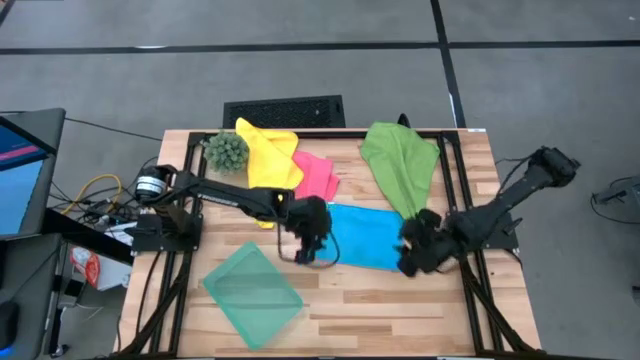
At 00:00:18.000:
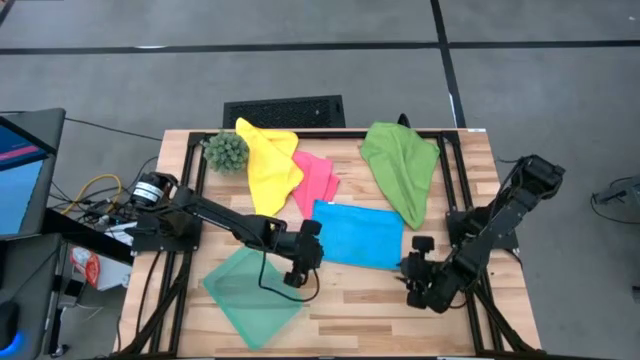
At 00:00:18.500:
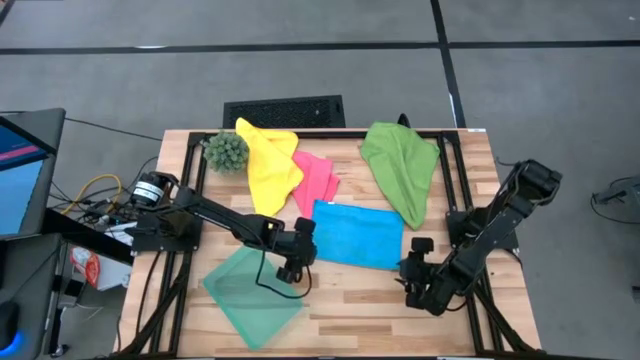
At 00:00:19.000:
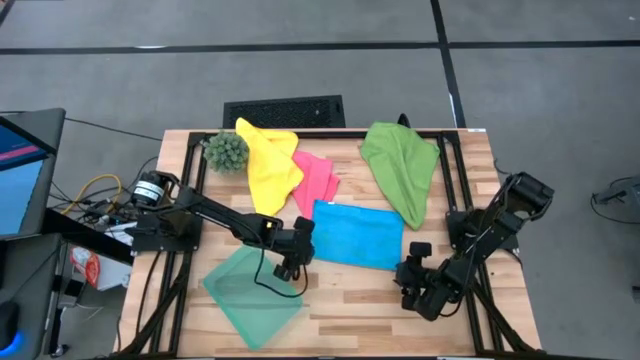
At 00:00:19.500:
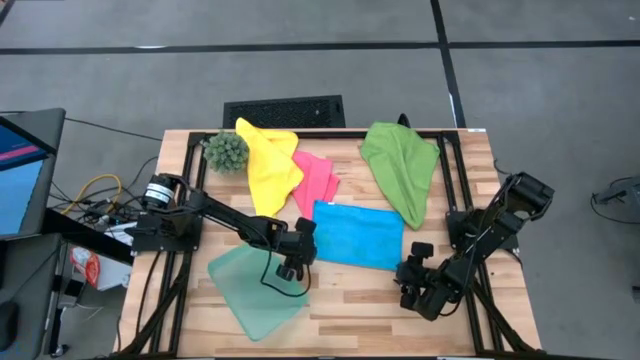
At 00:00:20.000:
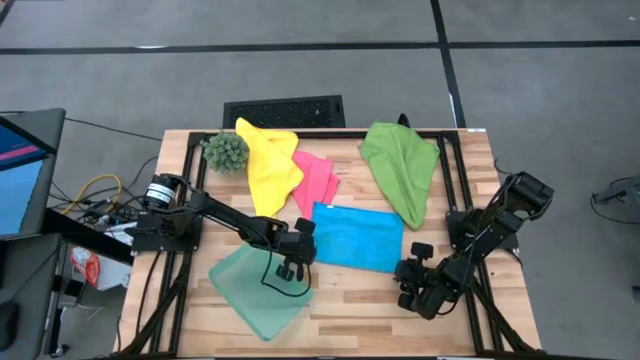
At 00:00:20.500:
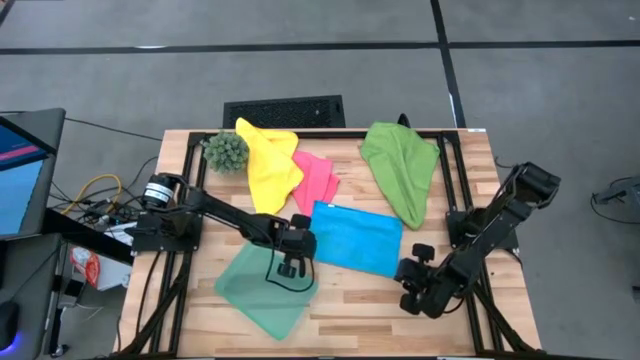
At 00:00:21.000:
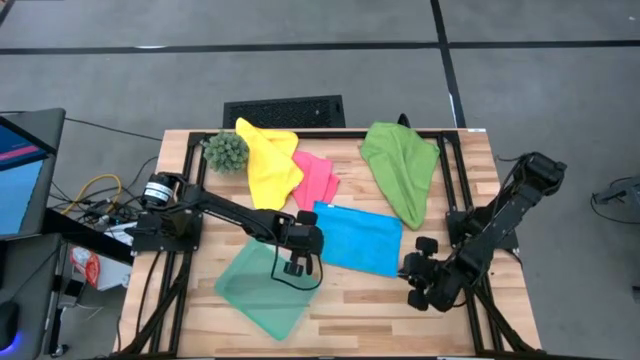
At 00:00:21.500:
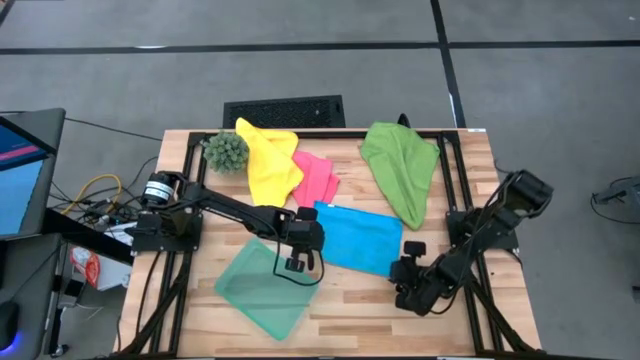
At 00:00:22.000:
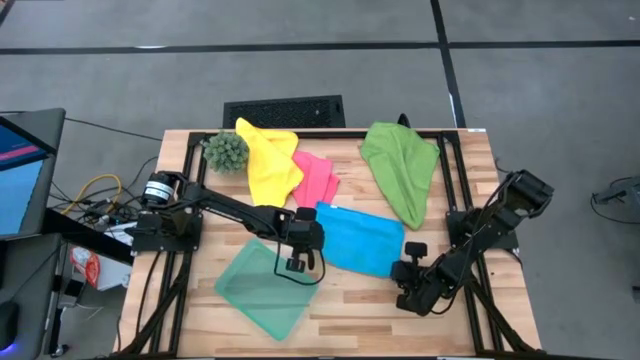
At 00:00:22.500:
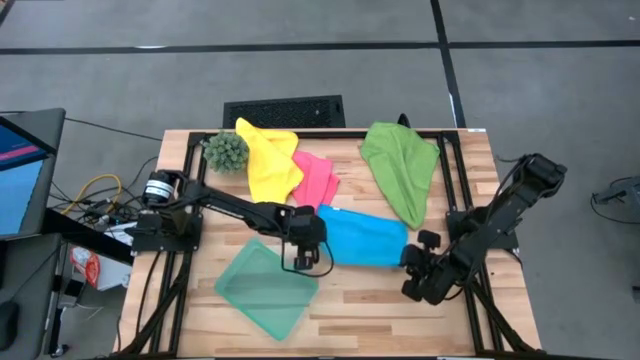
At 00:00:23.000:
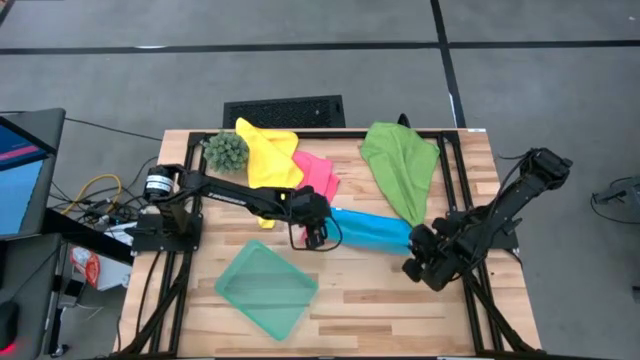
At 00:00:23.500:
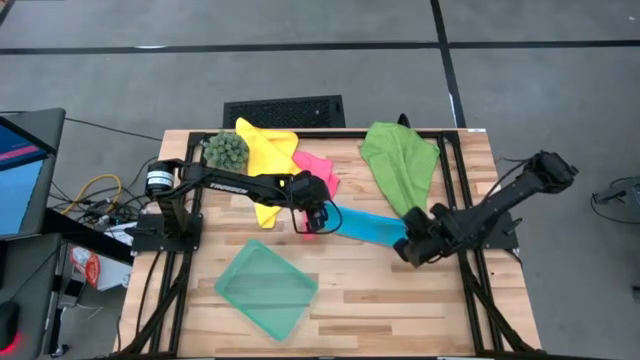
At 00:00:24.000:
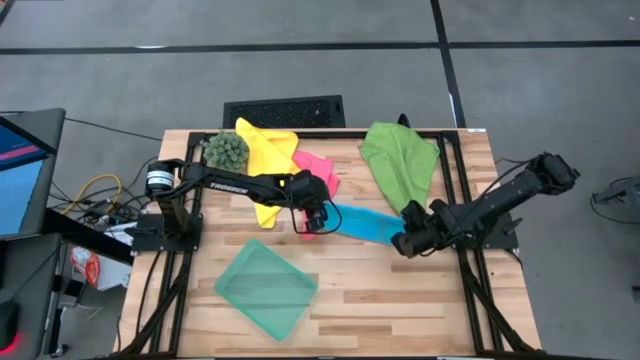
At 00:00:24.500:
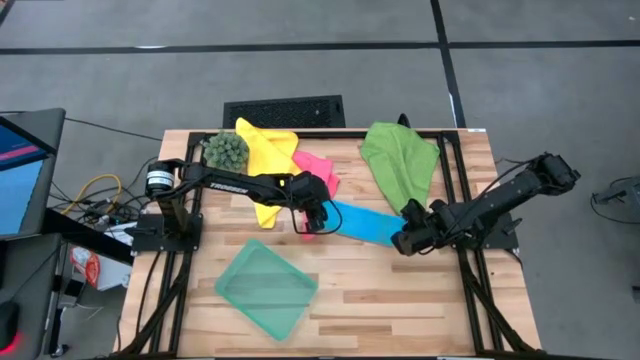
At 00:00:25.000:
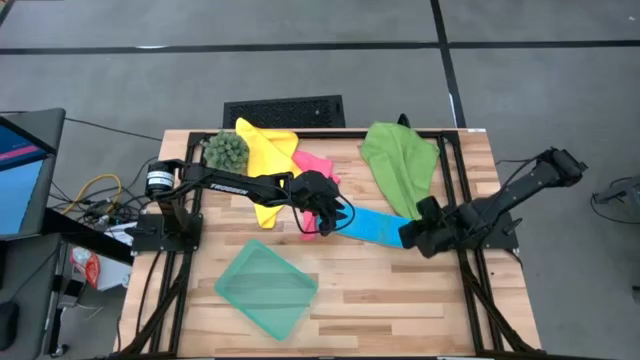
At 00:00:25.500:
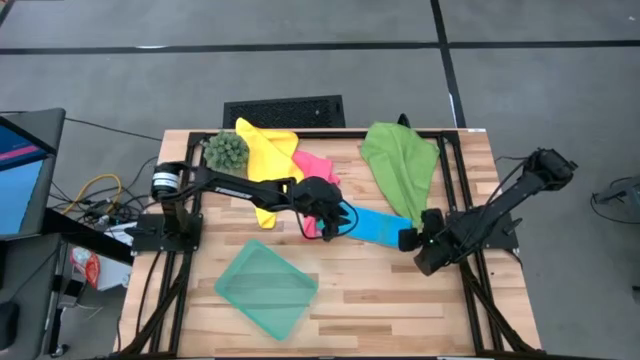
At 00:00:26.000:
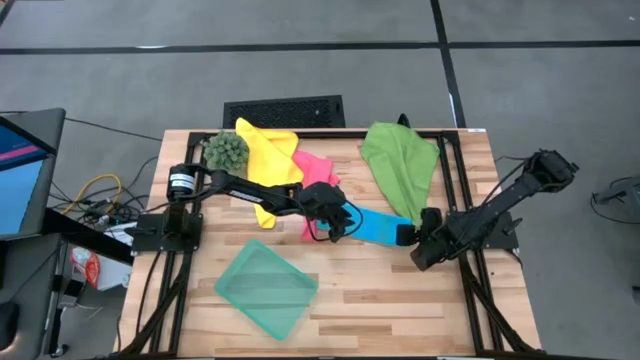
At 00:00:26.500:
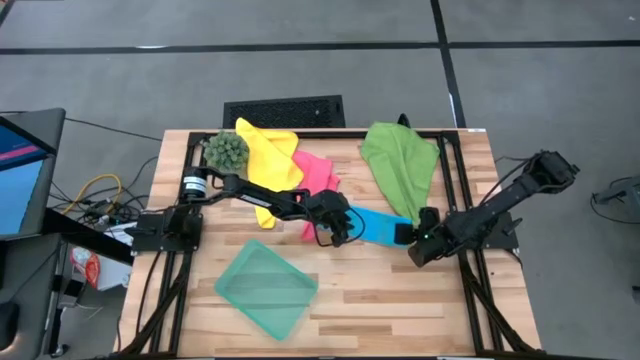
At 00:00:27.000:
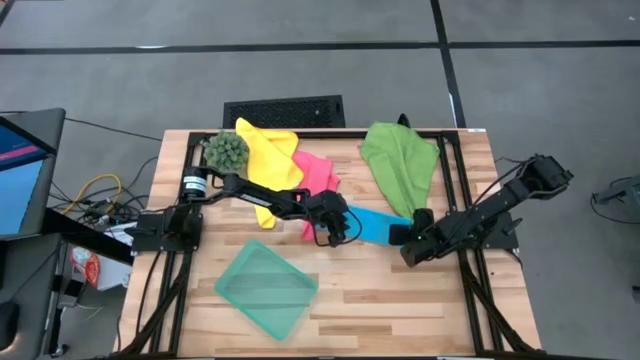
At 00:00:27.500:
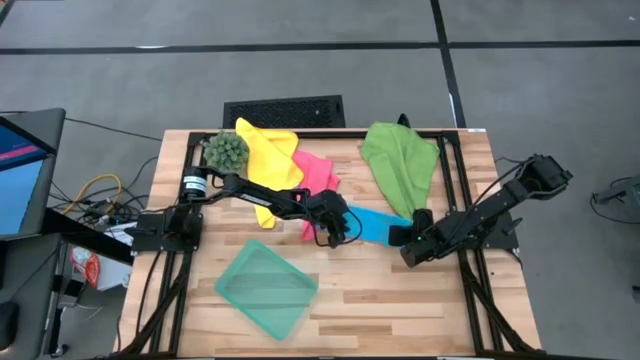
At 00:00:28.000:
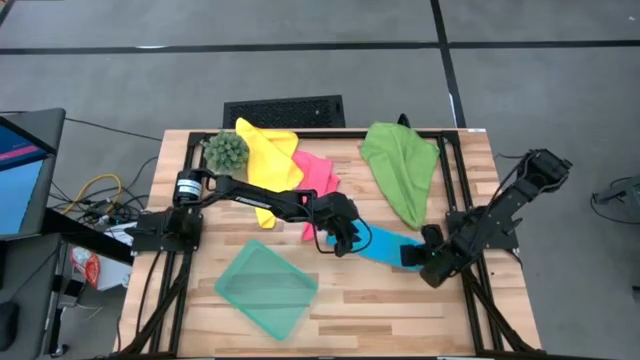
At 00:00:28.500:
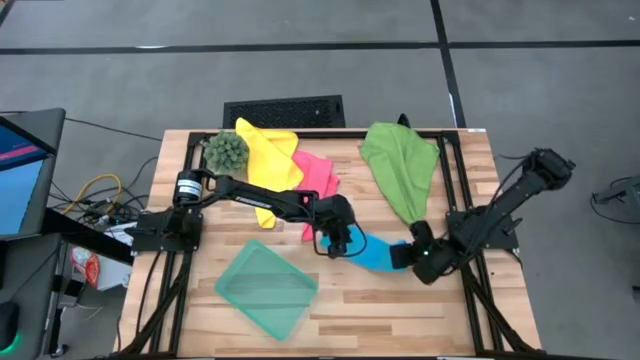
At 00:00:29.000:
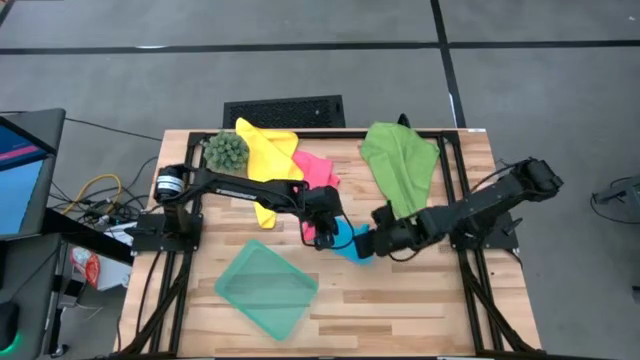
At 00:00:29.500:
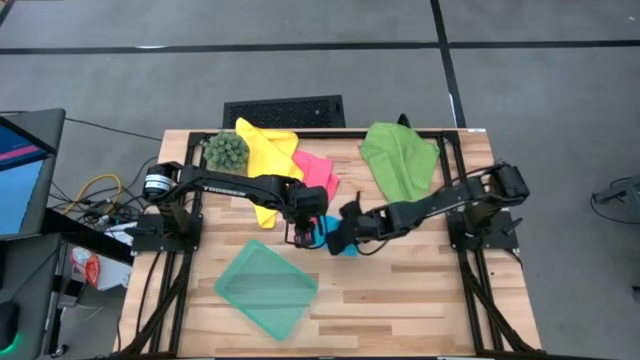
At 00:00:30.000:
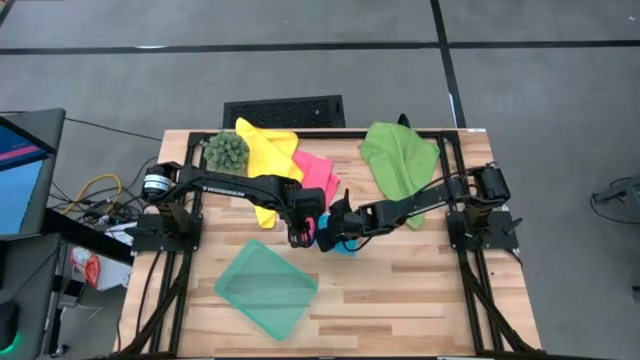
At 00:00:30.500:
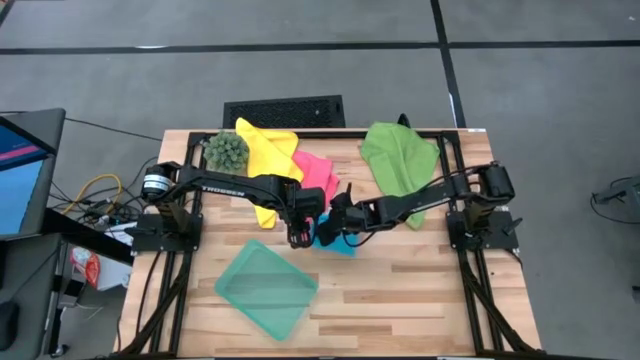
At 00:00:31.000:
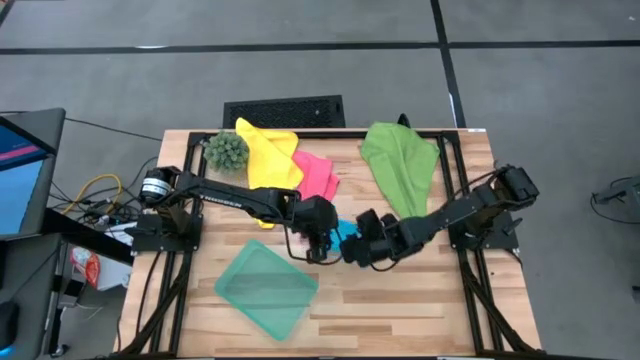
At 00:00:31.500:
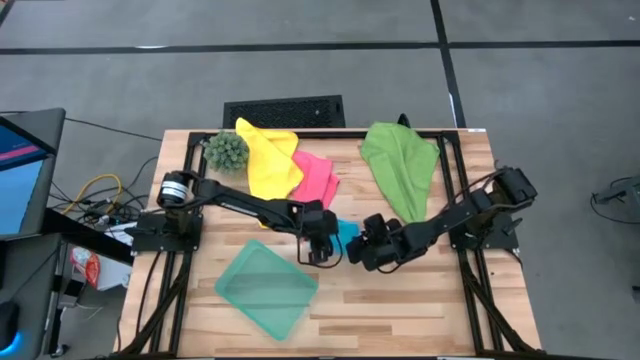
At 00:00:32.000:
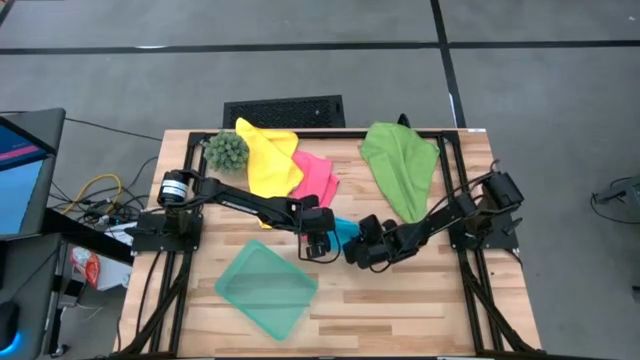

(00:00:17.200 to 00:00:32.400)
Task: Fold microfiber towels
Fold the blue microfiber towel
